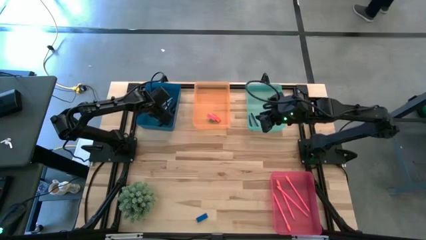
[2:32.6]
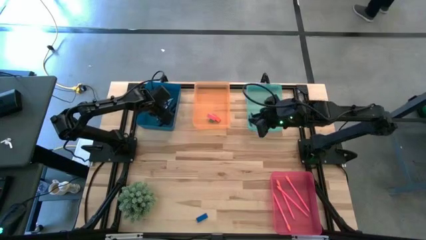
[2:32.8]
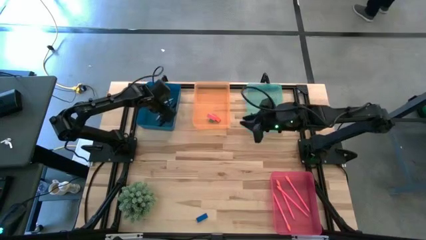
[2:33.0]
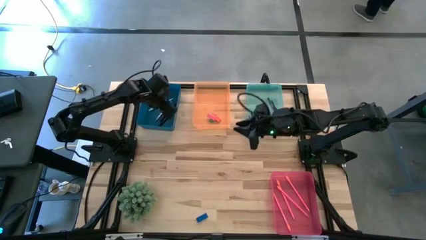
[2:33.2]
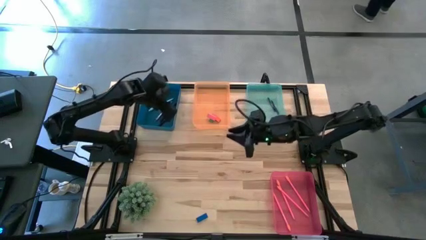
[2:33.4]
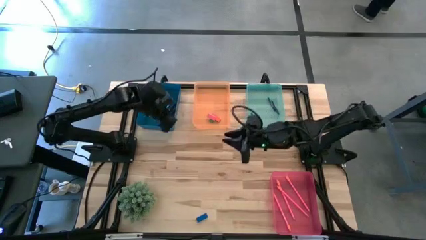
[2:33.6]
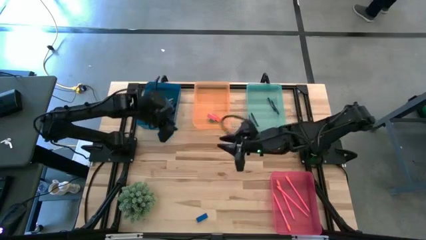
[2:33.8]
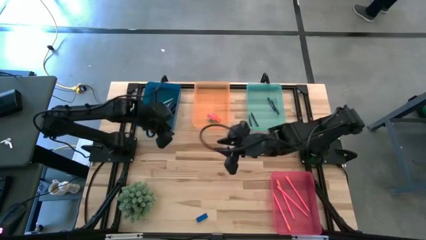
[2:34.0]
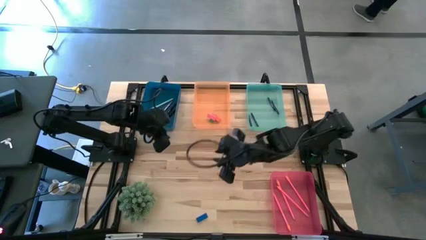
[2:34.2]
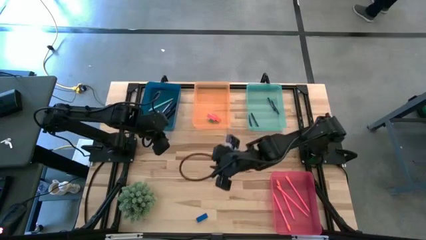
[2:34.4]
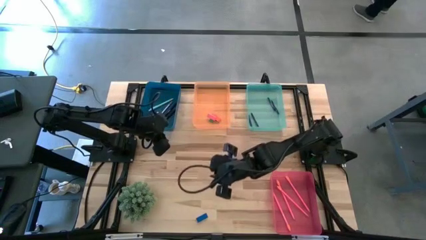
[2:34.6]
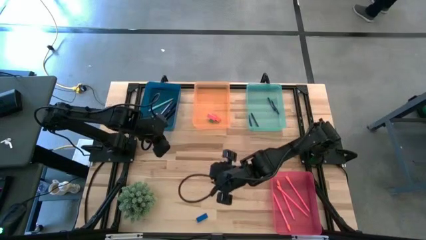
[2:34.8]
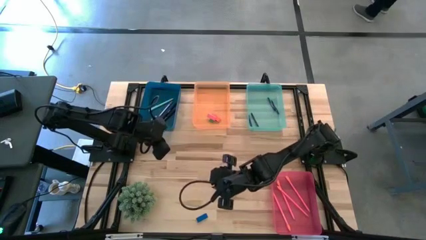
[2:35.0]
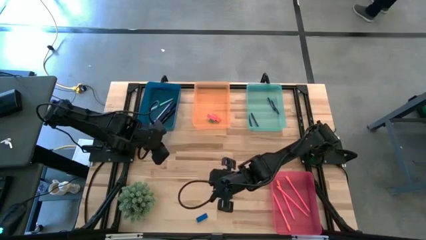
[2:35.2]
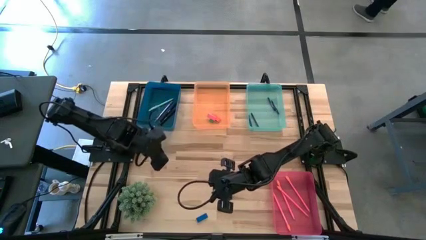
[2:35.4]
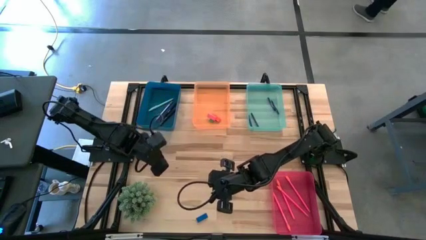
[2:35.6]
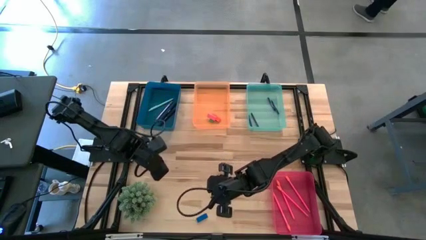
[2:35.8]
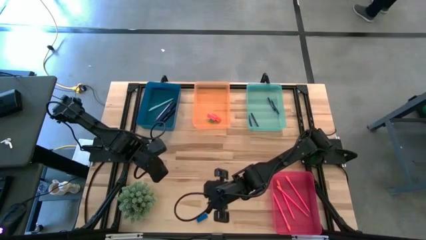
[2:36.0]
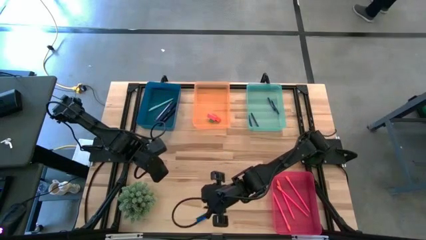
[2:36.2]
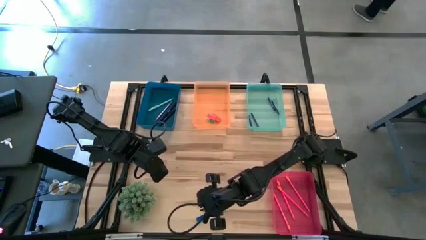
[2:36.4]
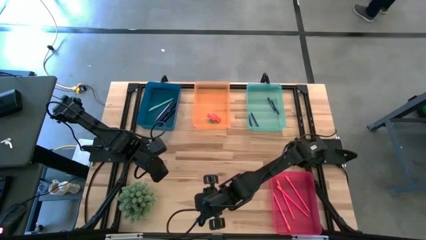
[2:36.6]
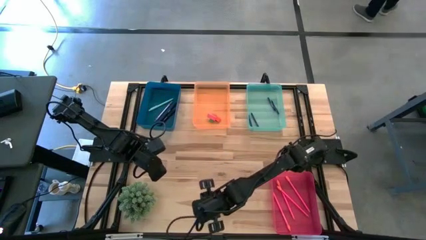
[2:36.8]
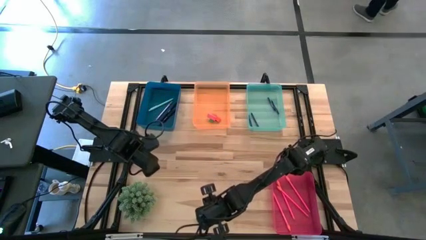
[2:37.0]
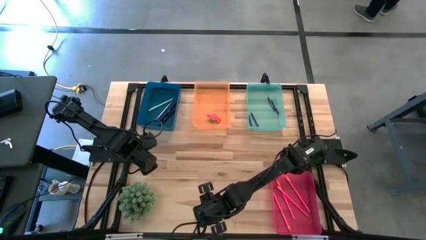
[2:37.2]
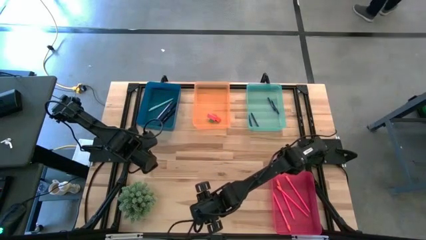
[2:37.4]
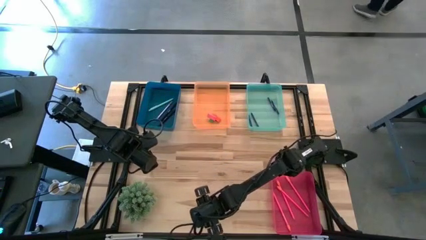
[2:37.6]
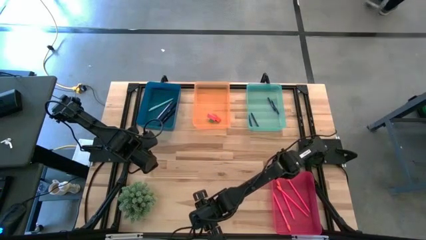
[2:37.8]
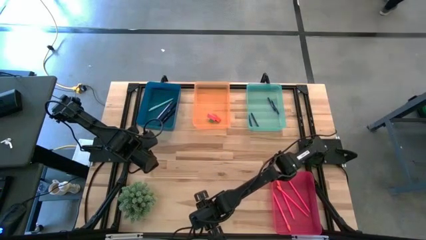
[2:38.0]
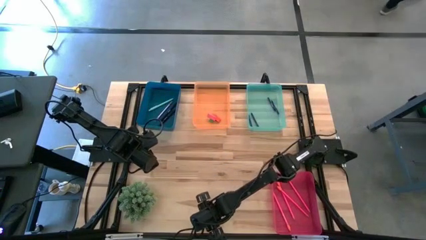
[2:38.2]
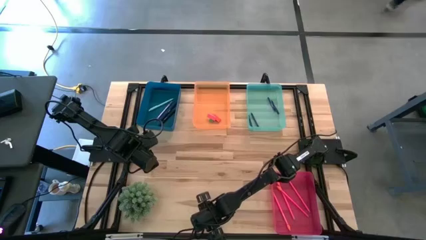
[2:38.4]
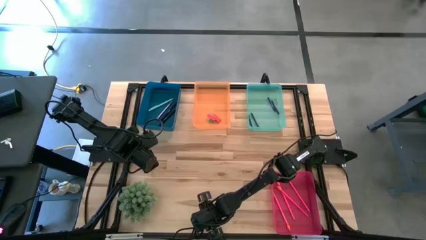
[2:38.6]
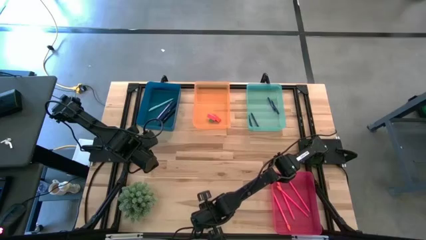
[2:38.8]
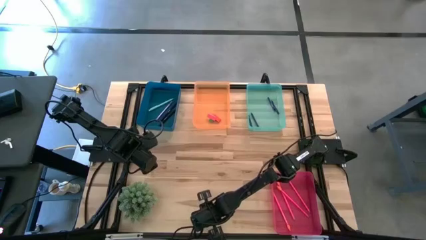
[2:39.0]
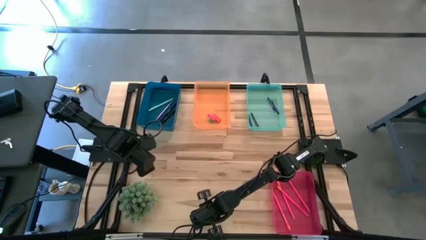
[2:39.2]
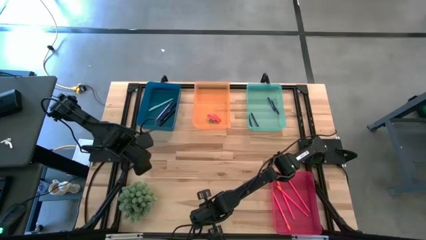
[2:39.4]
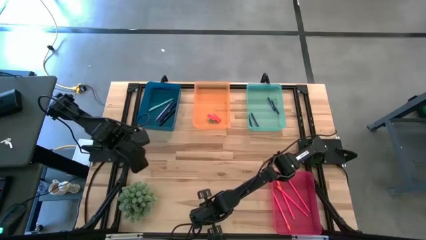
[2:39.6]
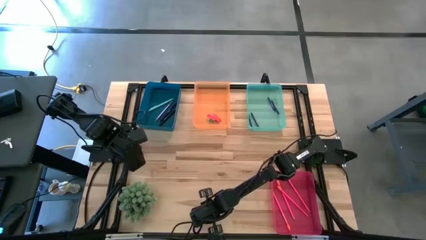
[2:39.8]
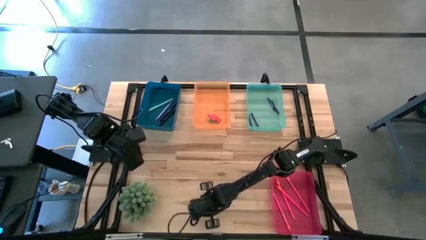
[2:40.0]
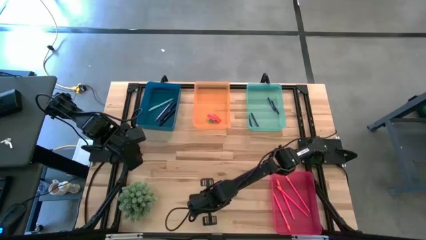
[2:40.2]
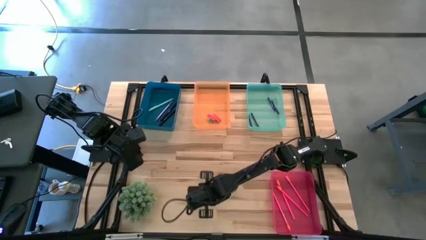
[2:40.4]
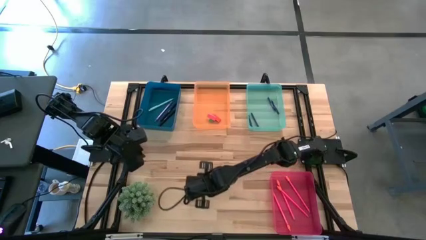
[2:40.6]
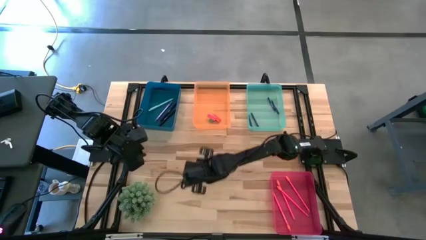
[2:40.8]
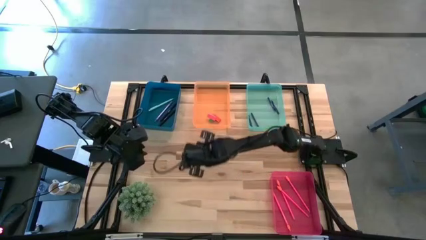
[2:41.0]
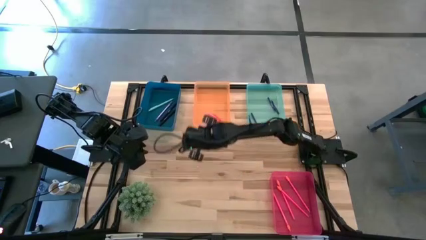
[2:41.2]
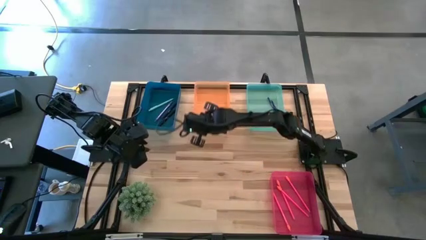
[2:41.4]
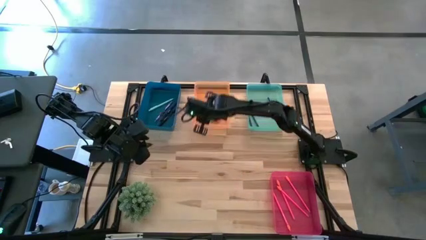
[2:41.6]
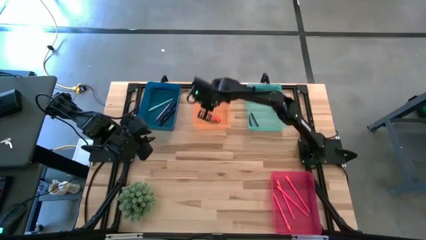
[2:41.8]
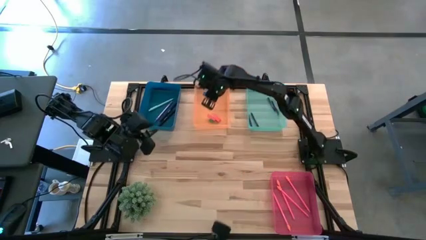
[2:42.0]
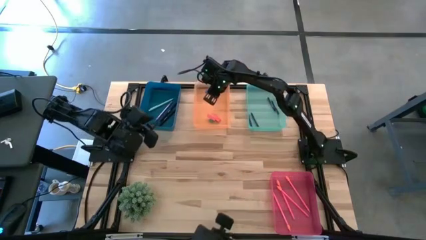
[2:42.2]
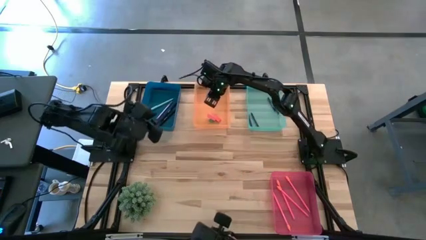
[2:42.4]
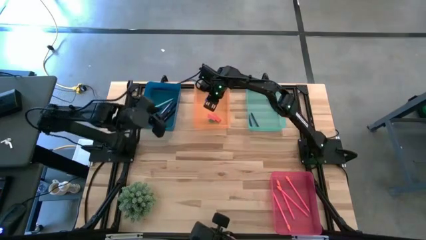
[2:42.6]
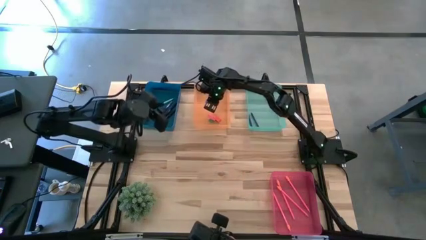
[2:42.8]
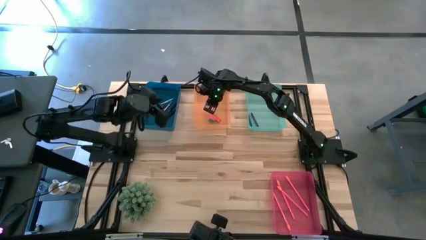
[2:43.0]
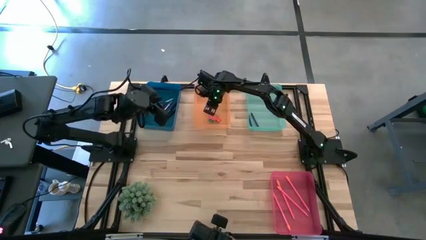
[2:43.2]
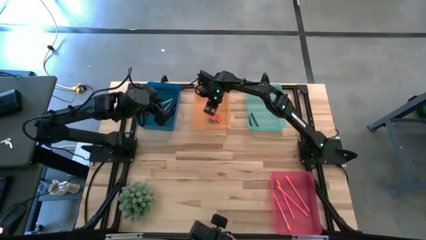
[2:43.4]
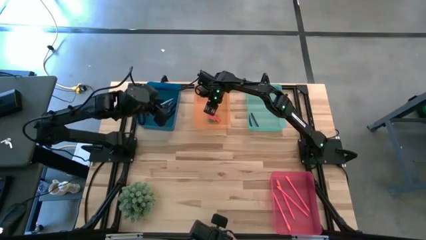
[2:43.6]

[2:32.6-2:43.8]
Task: Sort crayons/erasers/pens/pencils in bins
Put the blue eraser in the orange bin
